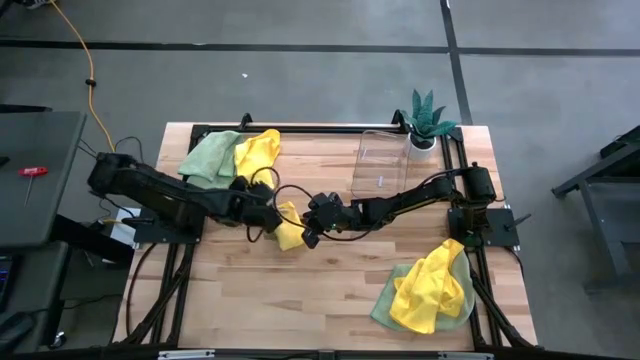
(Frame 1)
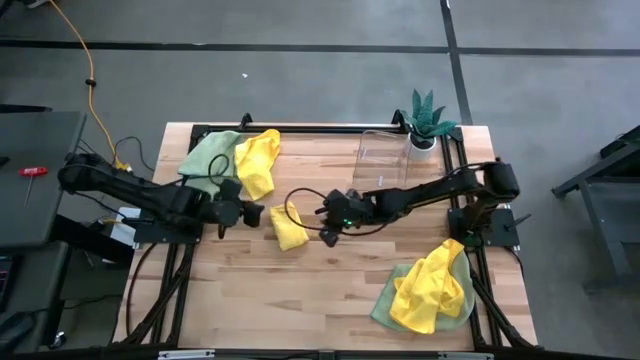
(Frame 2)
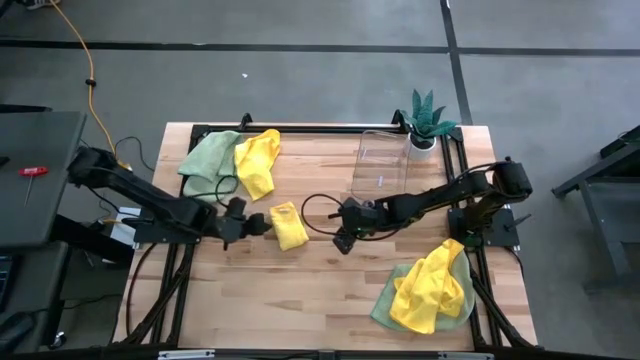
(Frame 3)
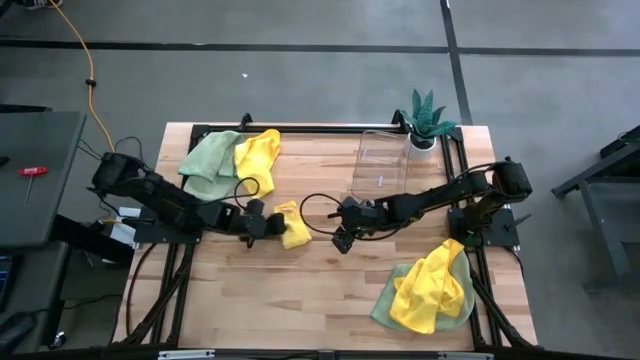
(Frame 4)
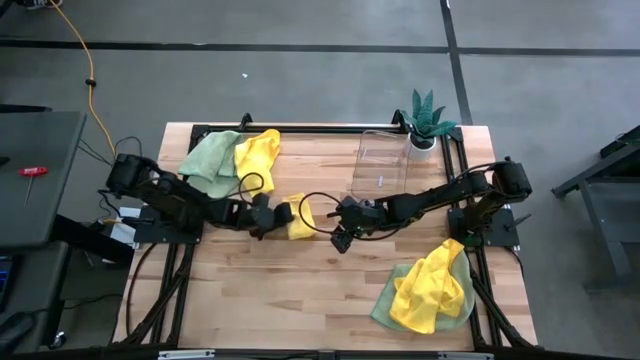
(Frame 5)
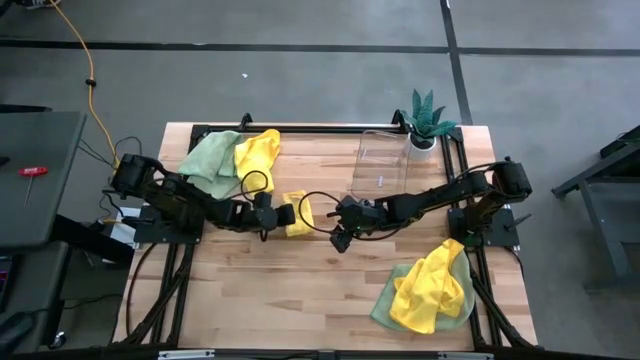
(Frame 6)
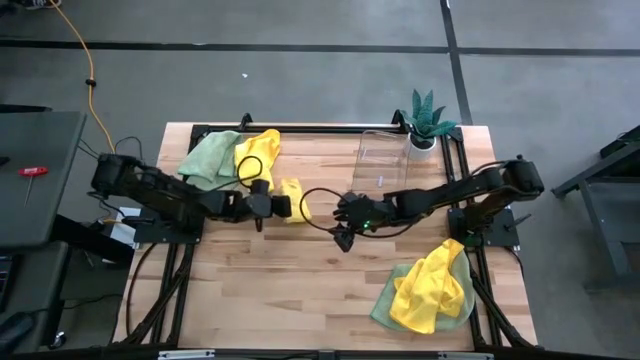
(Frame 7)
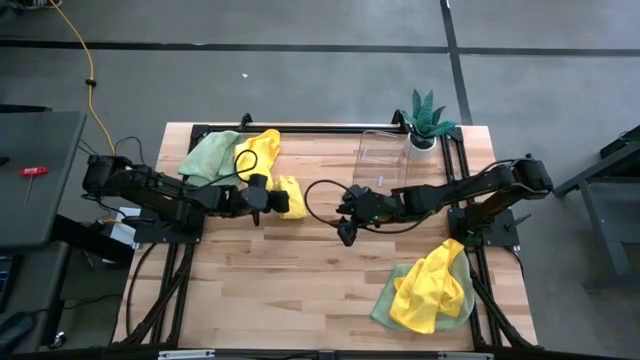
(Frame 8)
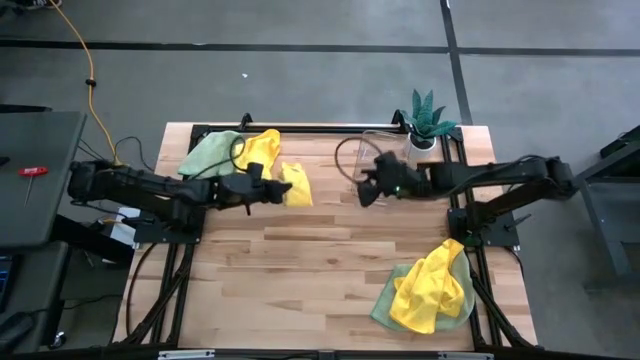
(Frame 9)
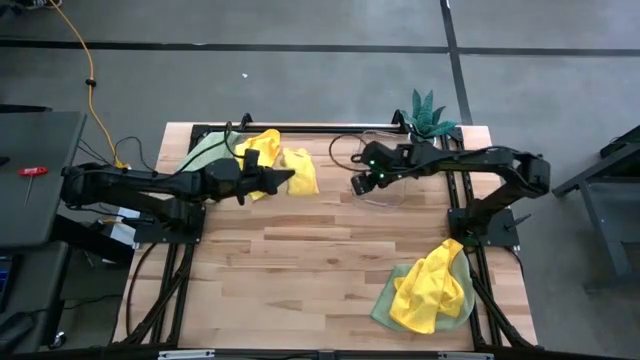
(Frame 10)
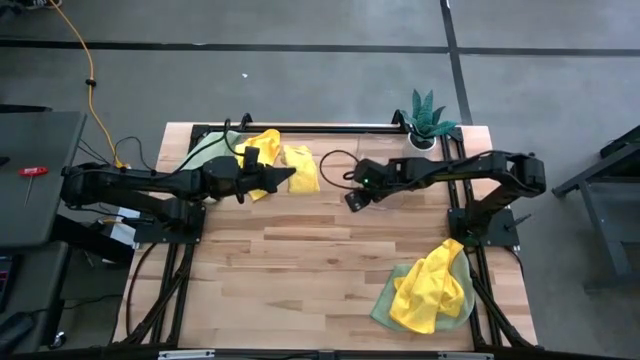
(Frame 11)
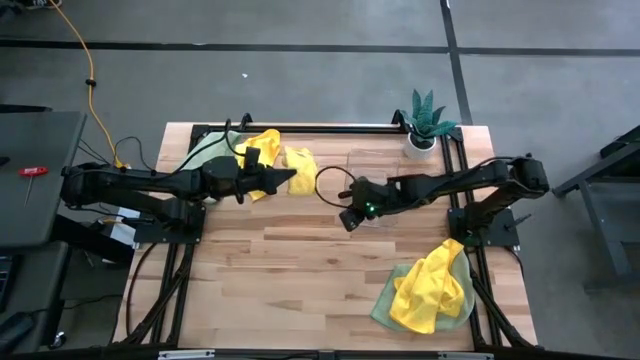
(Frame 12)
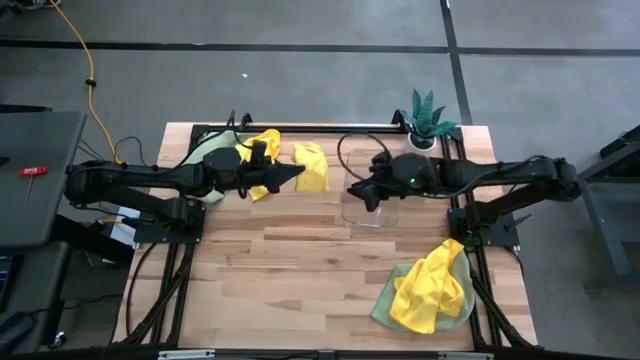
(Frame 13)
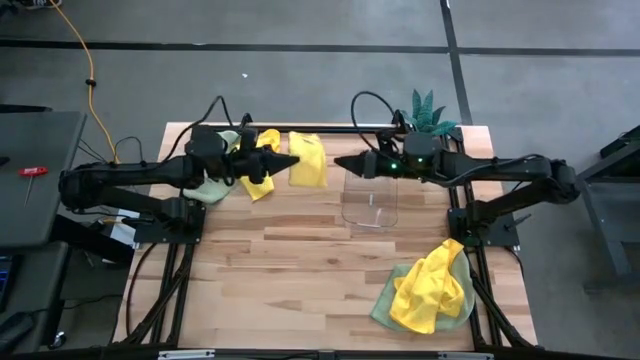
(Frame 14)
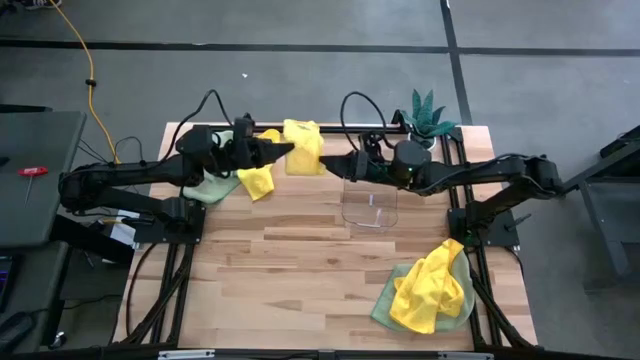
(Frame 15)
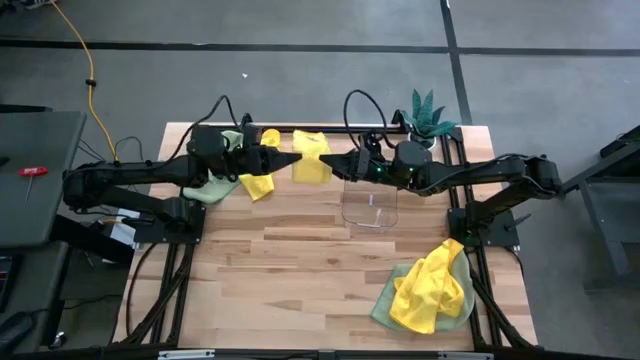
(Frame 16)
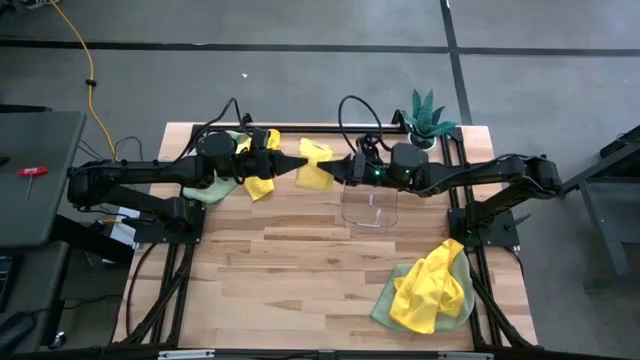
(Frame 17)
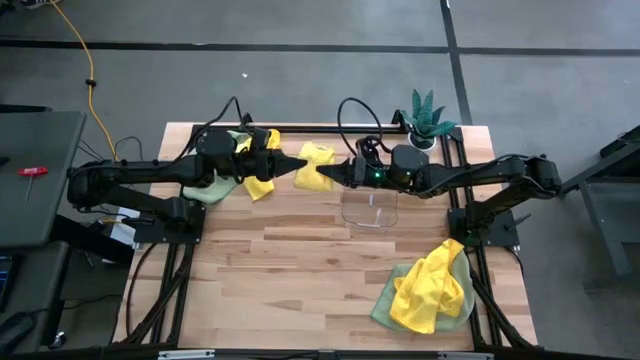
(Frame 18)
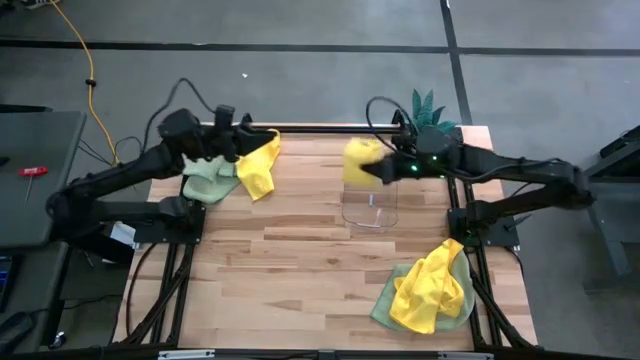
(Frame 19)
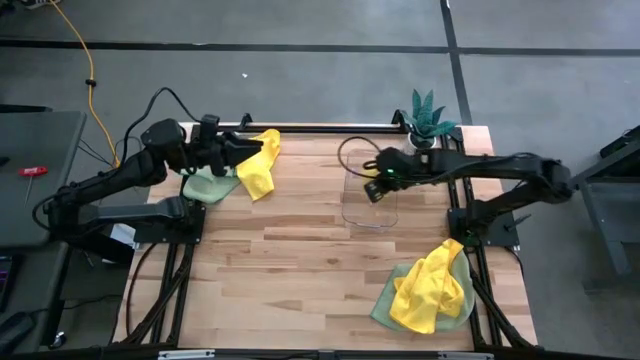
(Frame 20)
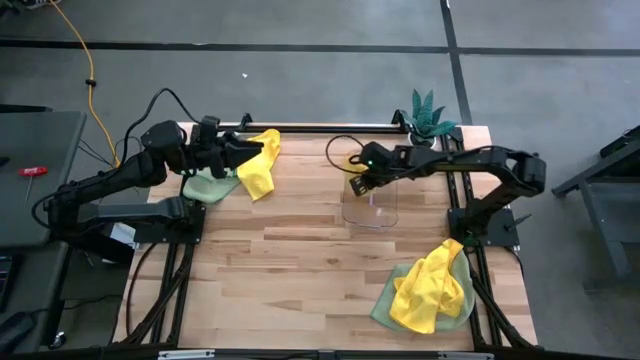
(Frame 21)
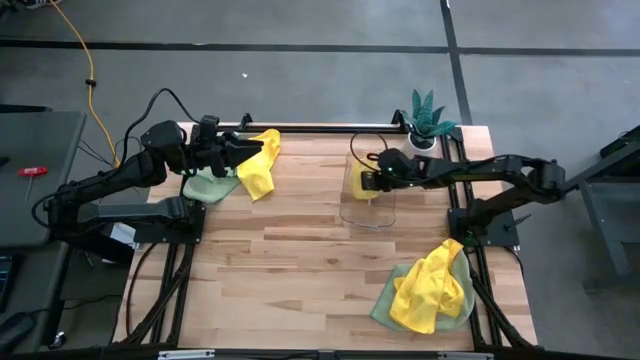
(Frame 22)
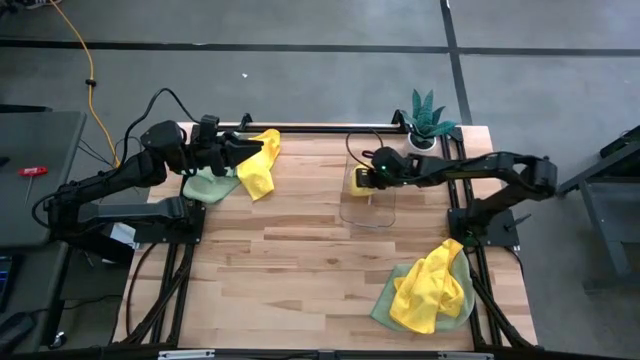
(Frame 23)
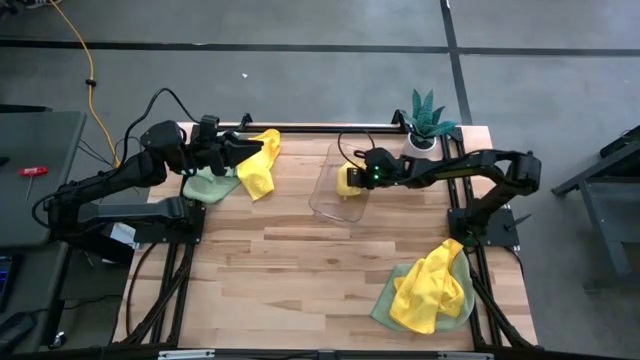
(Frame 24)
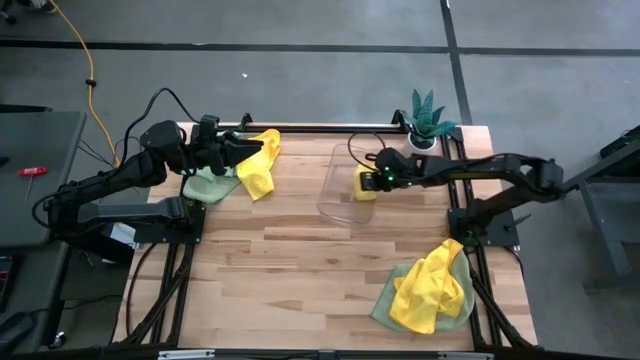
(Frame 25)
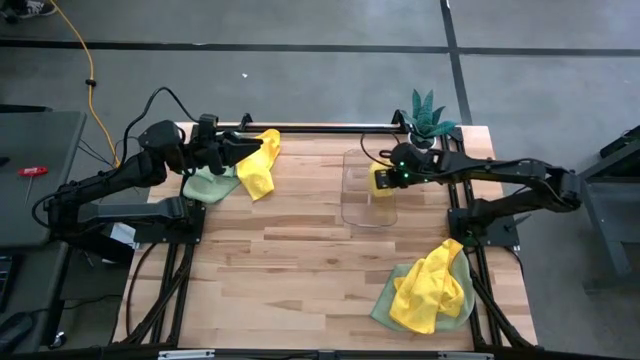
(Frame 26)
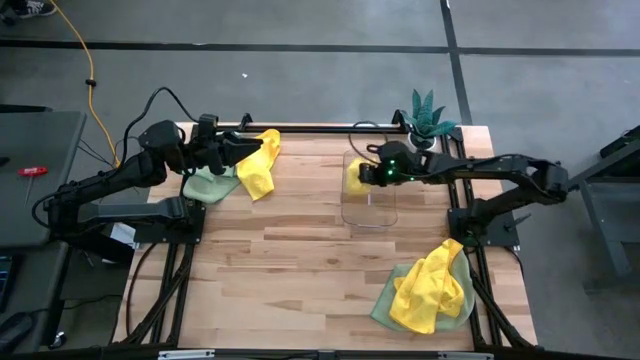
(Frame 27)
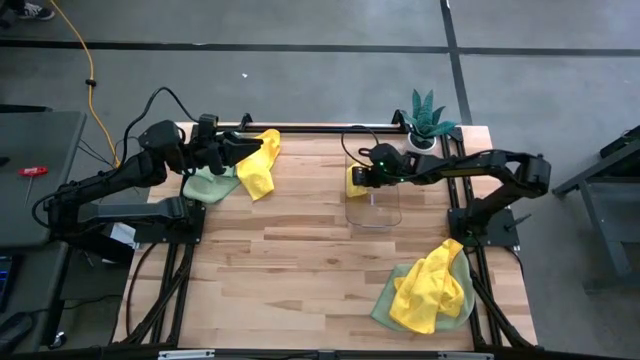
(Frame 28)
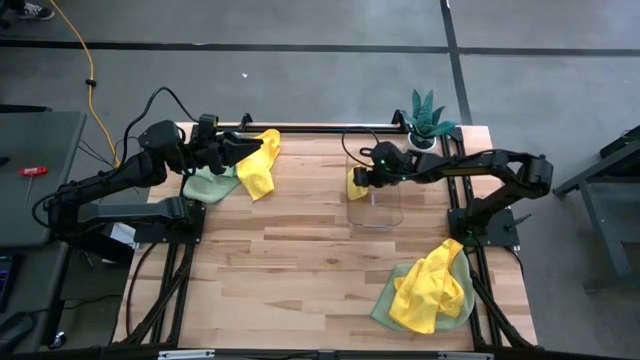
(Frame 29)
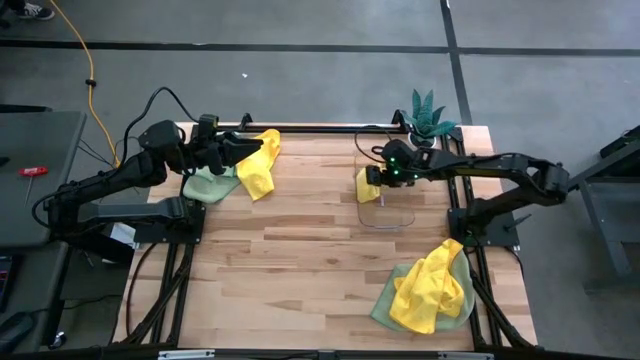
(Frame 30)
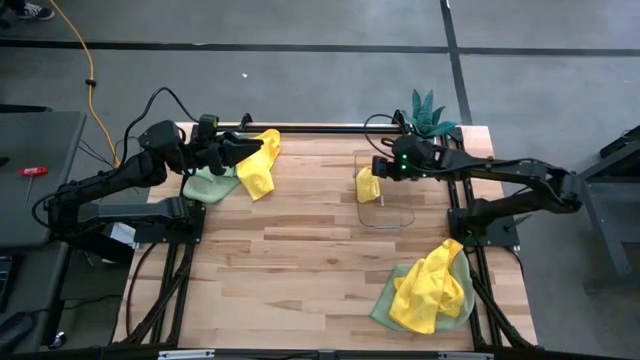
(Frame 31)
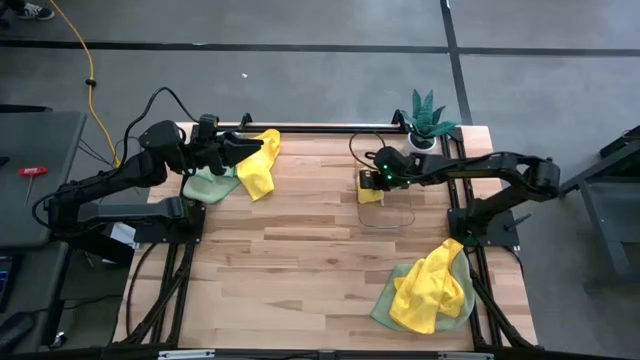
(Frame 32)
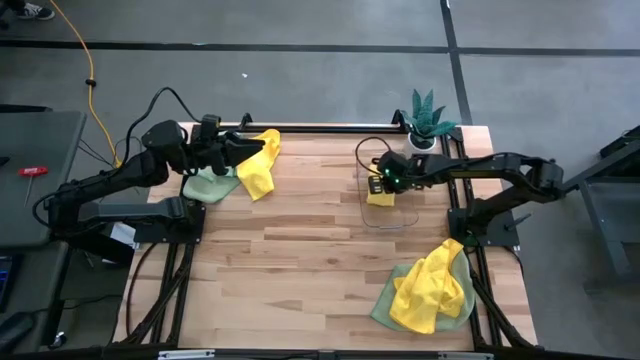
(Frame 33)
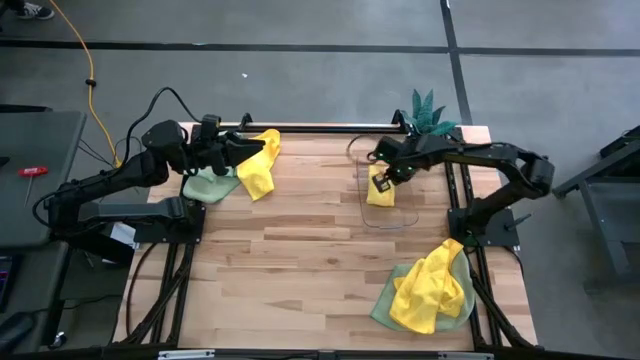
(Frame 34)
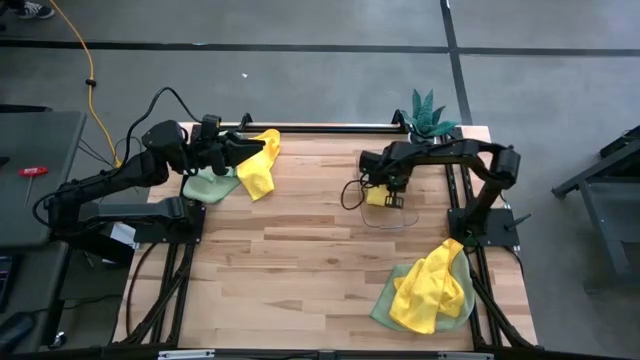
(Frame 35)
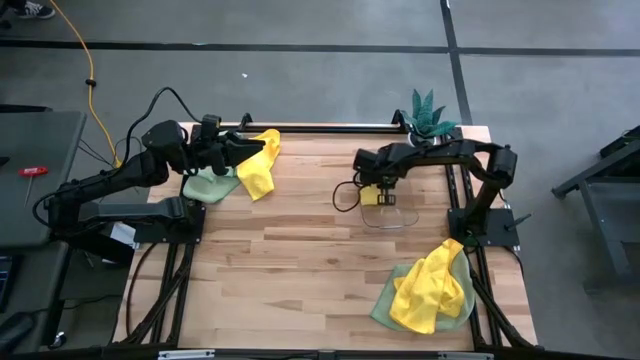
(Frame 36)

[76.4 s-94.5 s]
Task: Fold microfiber towels
Put the folded yellow microfiber towel into the transparent bin

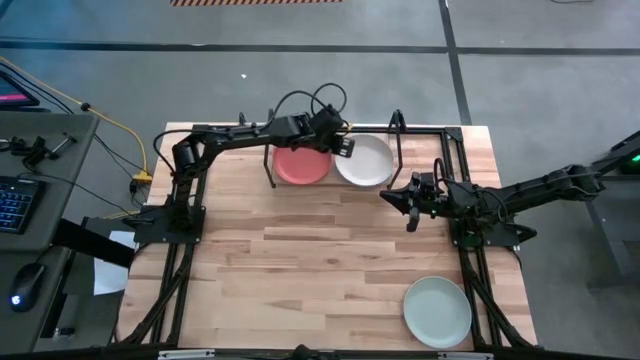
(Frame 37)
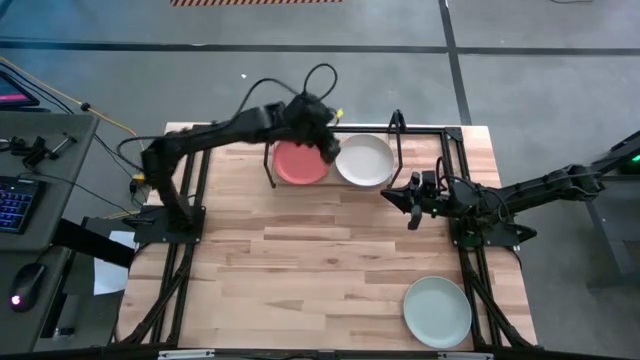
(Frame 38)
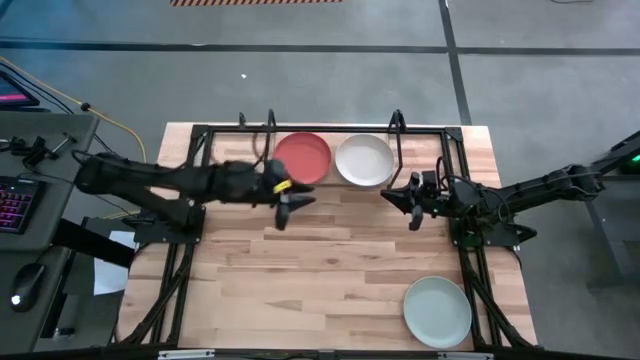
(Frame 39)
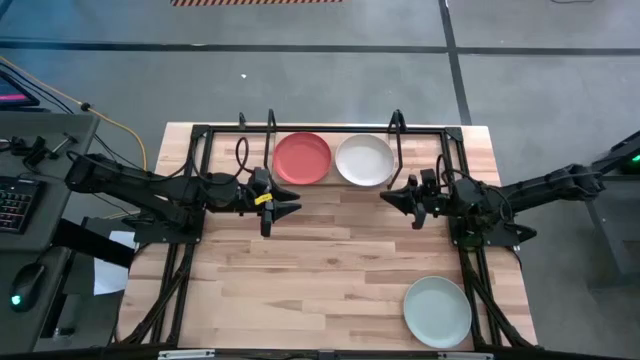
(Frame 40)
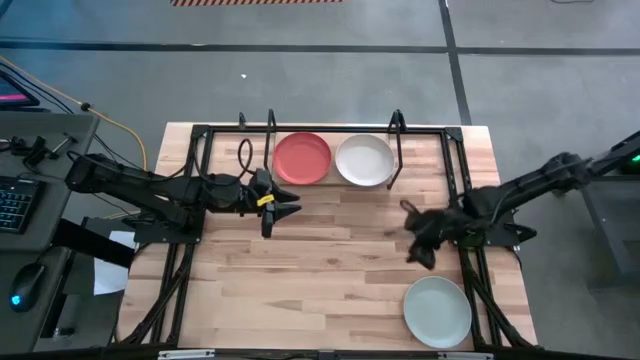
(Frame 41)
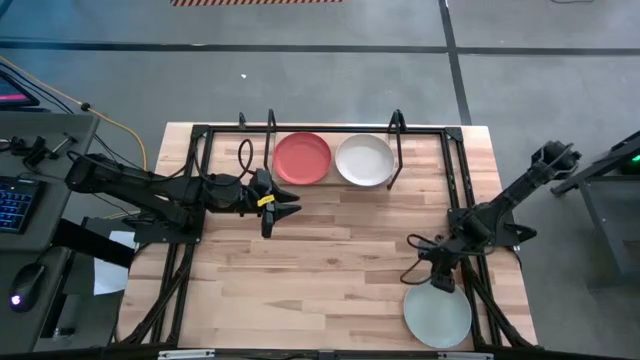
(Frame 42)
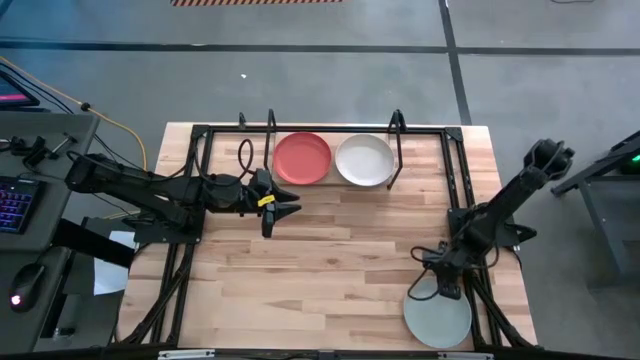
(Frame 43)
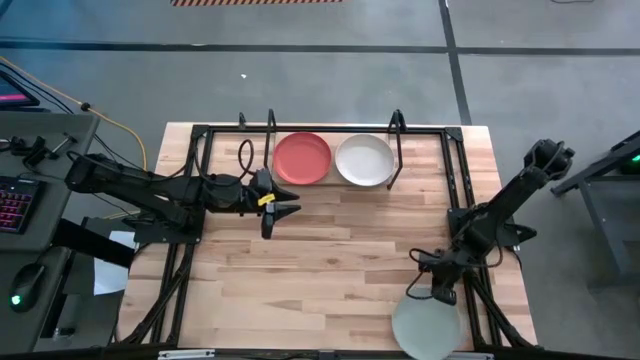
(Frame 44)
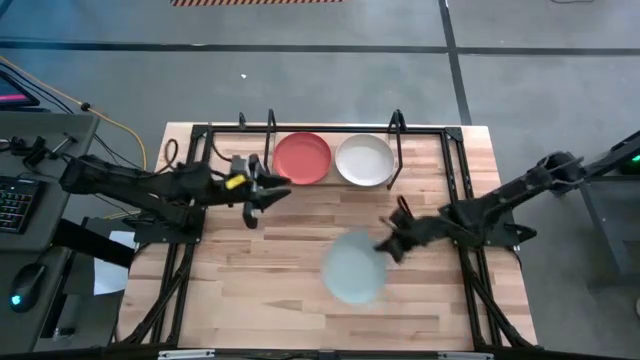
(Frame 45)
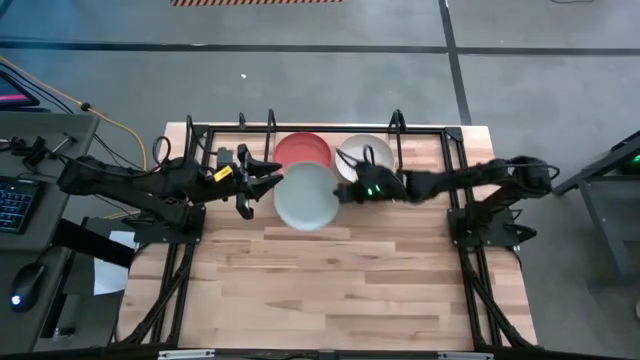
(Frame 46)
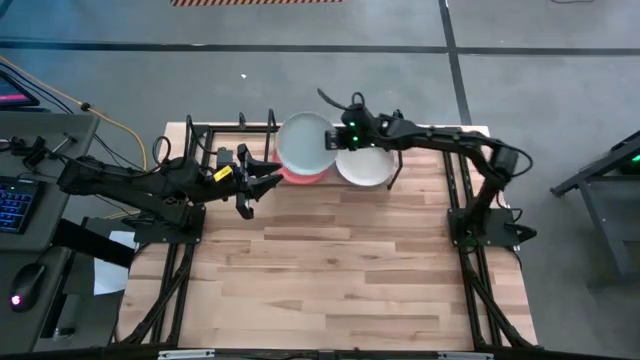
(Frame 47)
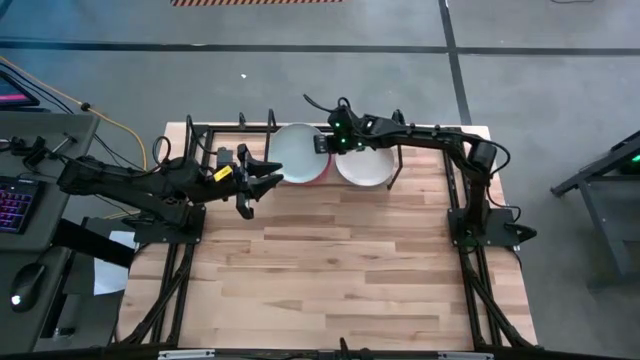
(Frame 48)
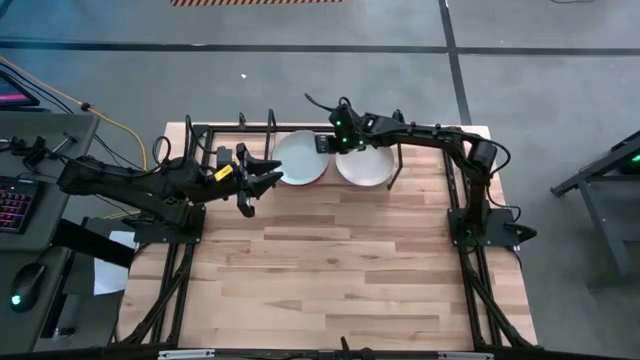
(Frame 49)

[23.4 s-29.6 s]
Task: Place and stack plates onto a shelf
Stack the white plate on top of the orange plate
